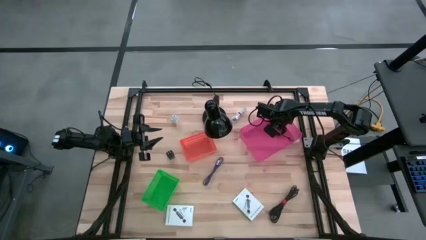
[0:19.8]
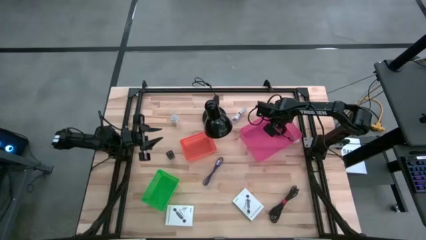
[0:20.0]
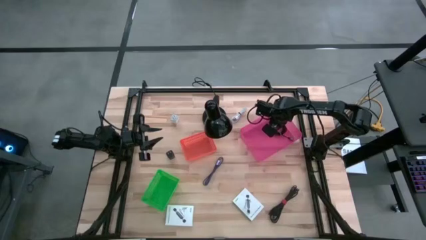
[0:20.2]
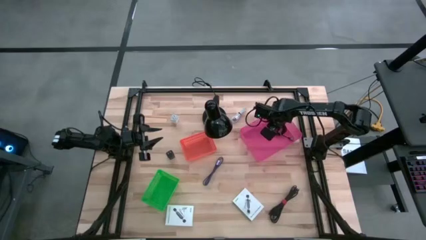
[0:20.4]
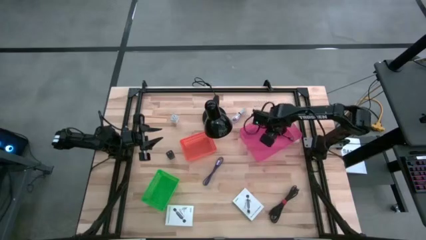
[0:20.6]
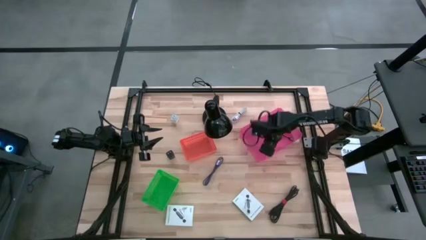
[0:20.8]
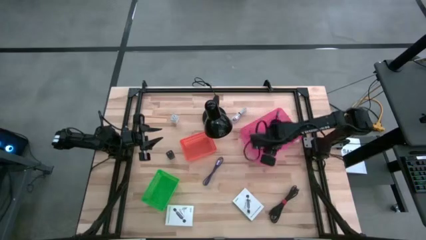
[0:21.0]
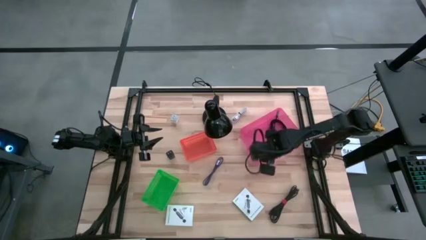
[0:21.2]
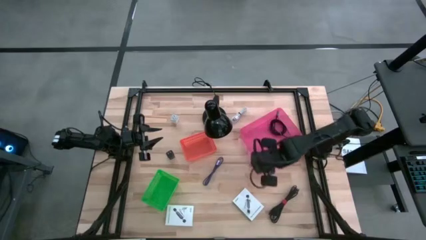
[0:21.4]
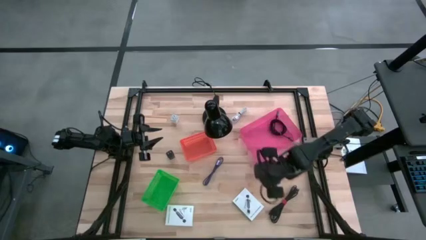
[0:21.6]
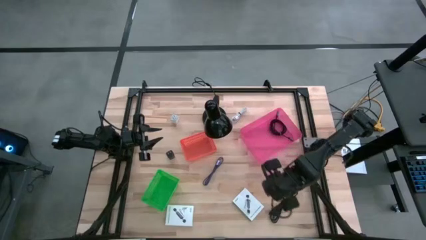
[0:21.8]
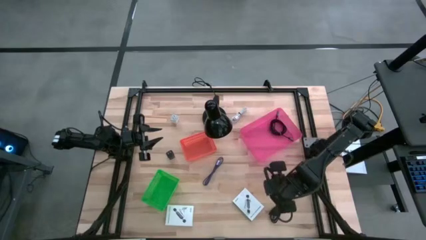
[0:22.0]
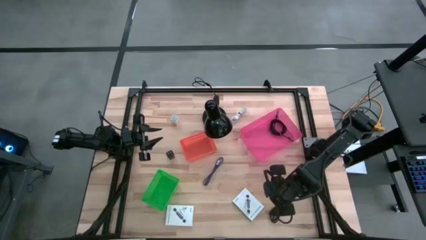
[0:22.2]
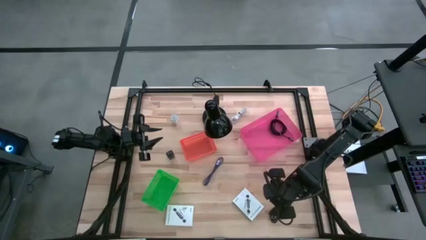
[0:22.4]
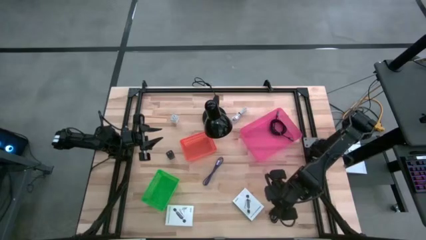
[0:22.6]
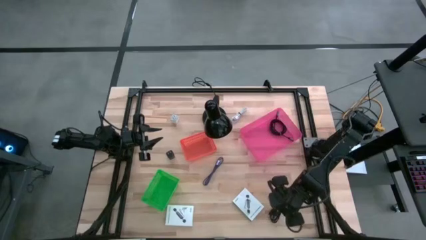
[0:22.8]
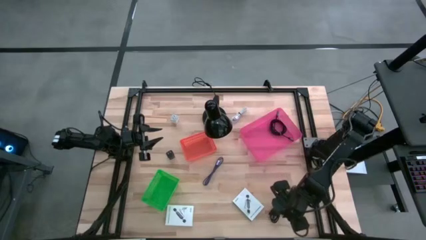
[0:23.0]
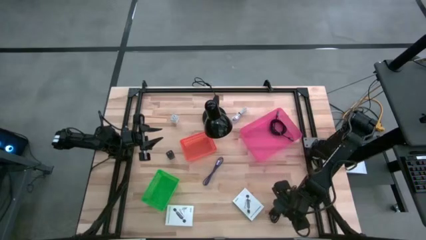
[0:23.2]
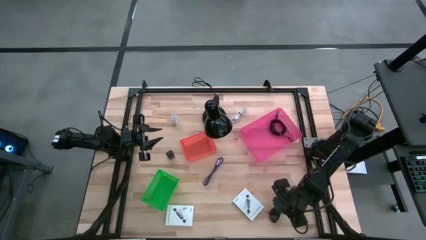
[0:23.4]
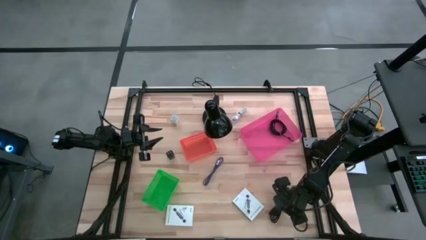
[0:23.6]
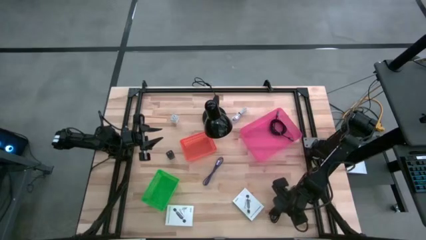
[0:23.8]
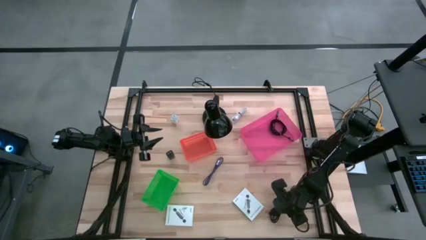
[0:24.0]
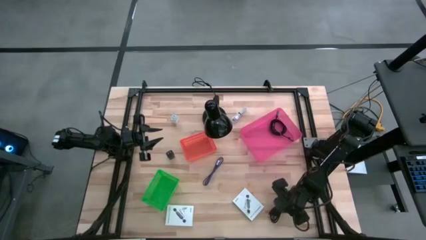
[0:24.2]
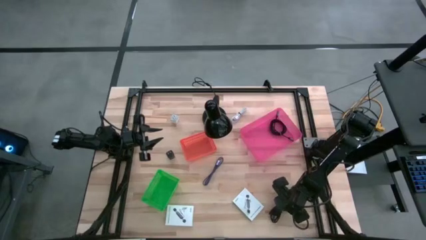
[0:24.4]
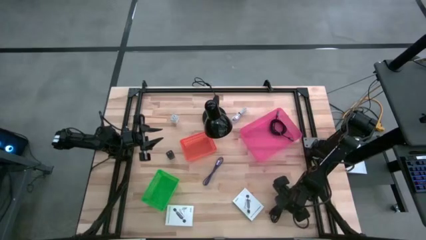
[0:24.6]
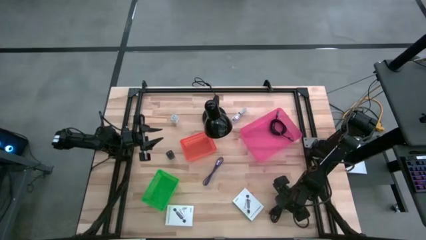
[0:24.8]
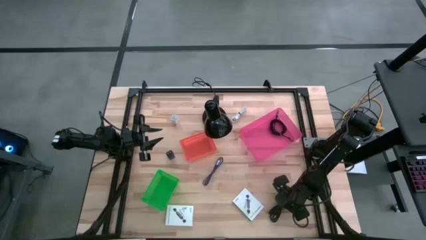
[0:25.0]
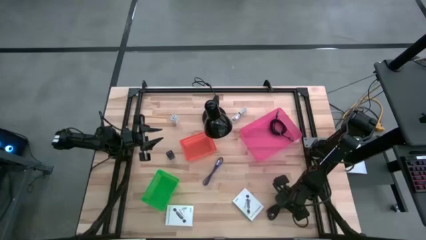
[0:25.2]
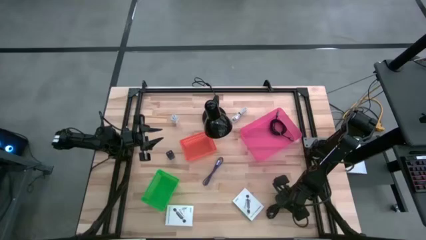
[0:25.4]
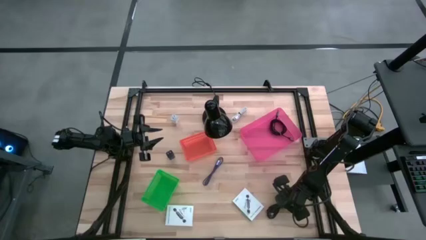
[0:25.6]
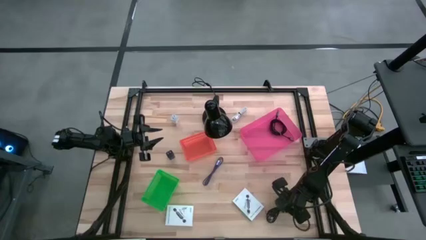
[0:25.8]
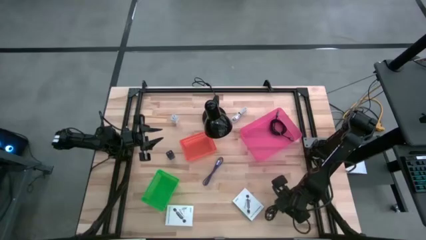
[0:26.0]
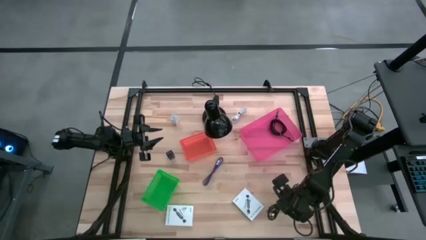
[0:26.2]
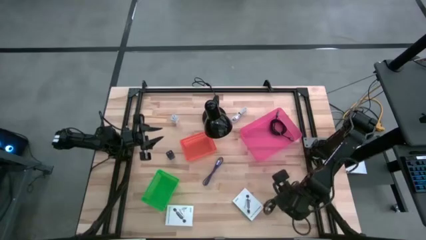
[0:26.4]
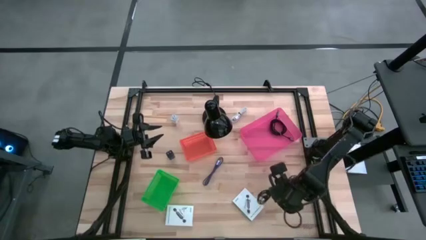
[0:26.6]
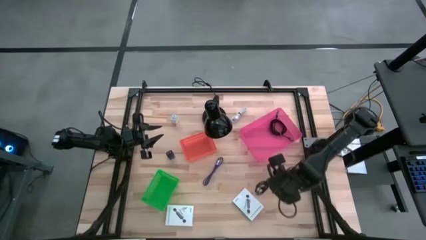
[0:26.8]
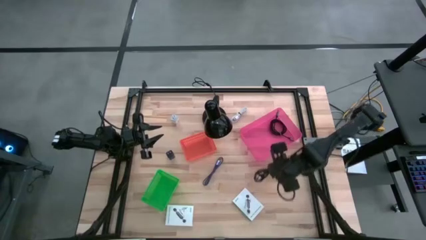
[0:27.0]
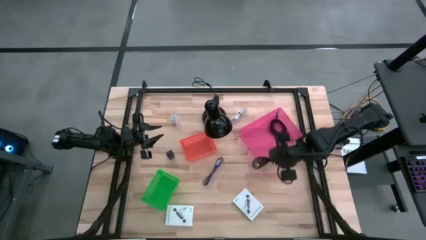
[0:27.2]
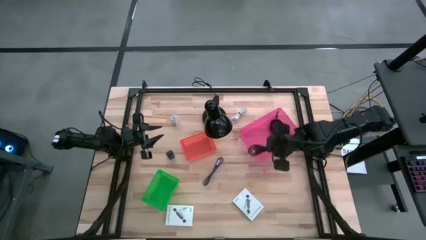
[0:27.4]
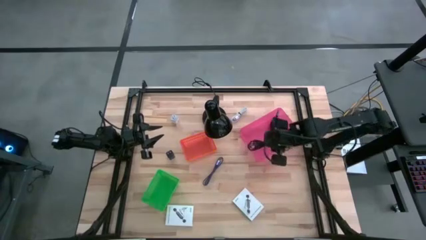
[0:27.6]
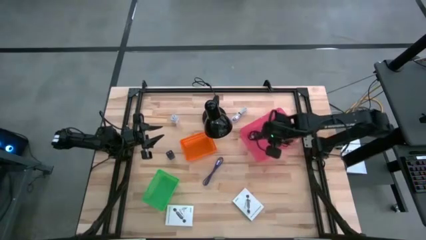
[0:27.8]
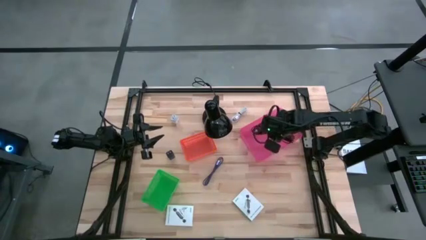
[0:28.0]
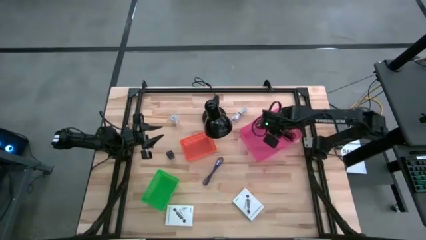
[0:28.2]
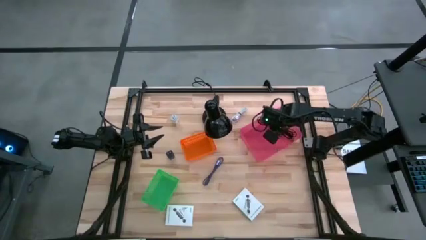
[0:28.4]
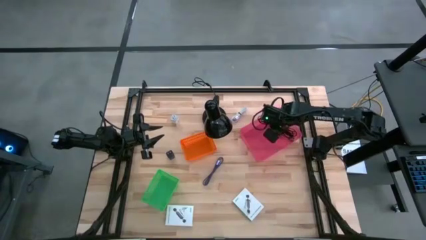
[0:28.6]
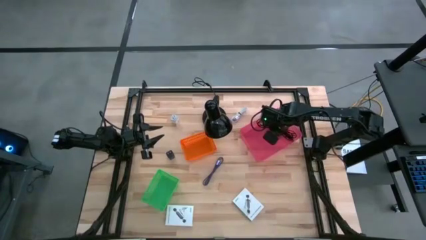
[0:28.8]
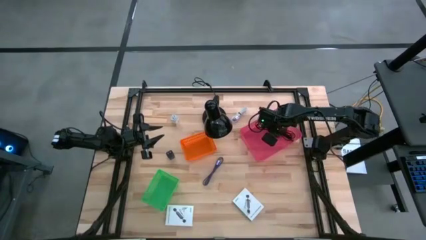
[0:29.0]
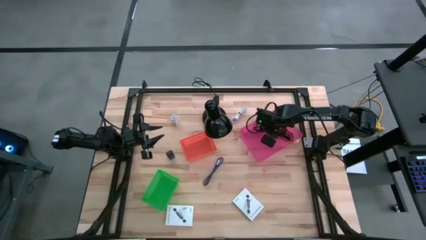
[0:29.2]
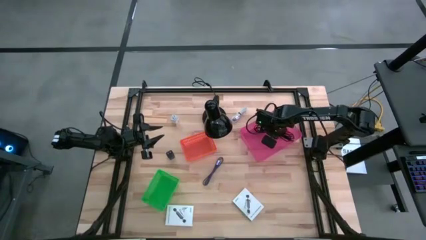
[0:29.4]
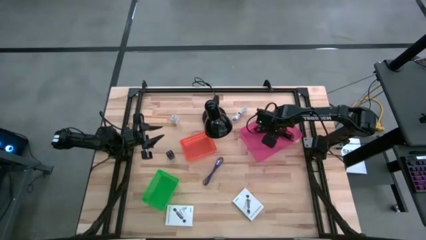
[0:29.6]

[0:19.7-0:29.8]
Task: Pick and place items into bin
Put the black charger cable into the pink bin

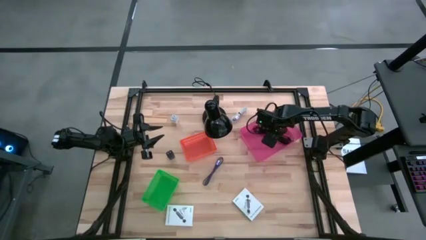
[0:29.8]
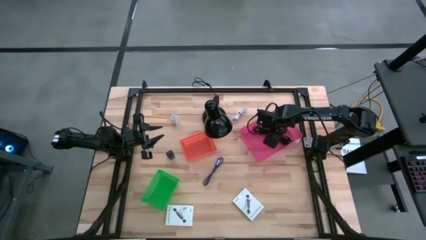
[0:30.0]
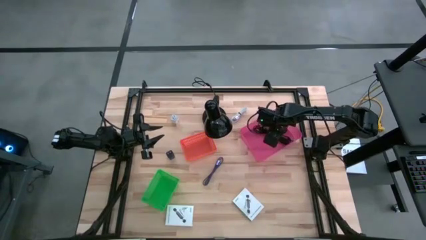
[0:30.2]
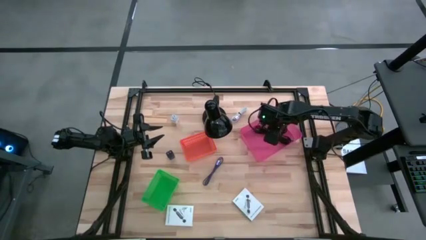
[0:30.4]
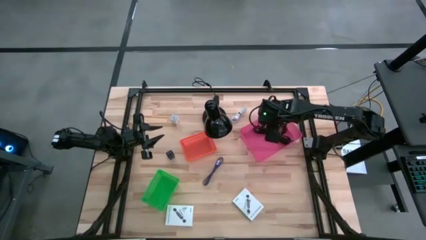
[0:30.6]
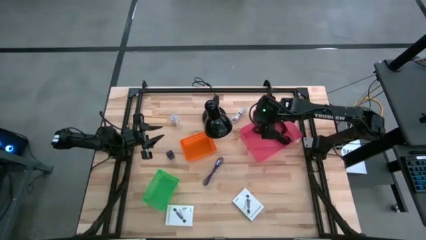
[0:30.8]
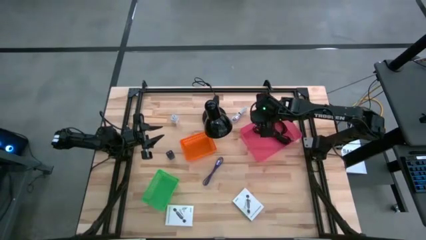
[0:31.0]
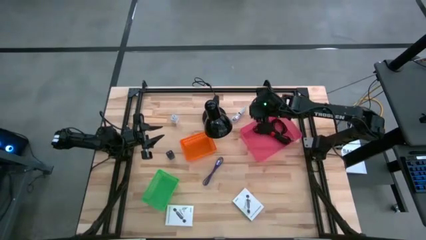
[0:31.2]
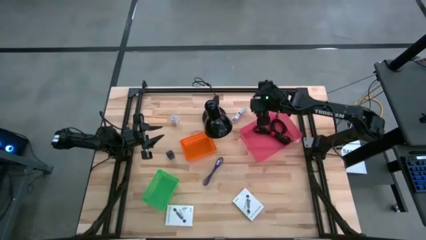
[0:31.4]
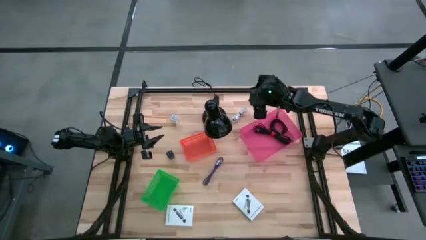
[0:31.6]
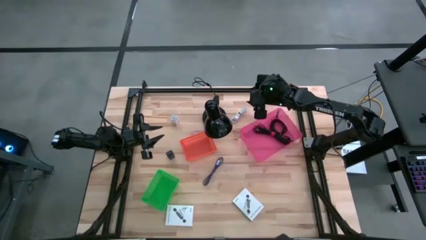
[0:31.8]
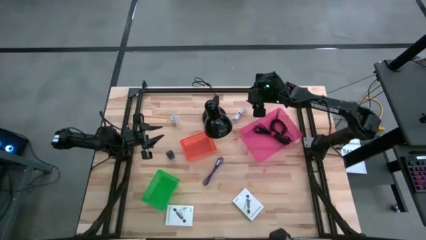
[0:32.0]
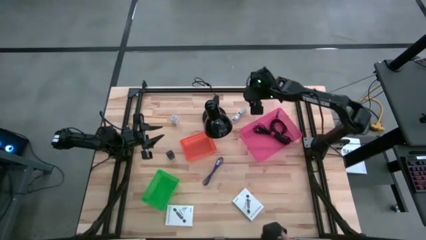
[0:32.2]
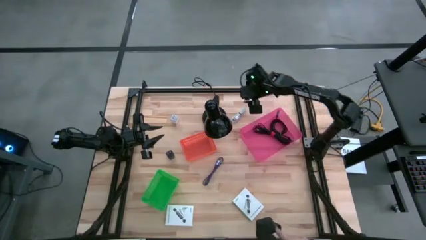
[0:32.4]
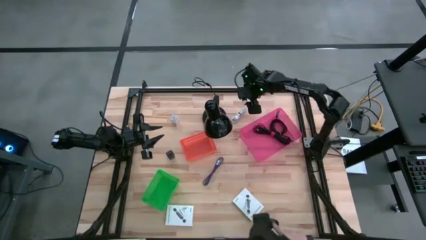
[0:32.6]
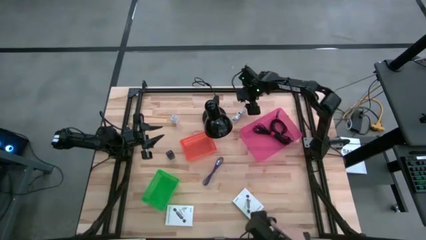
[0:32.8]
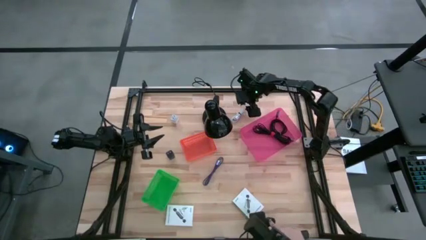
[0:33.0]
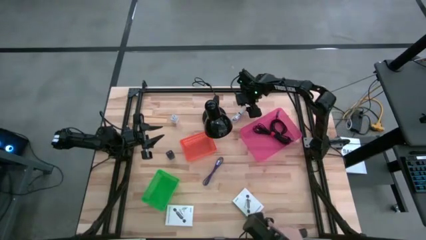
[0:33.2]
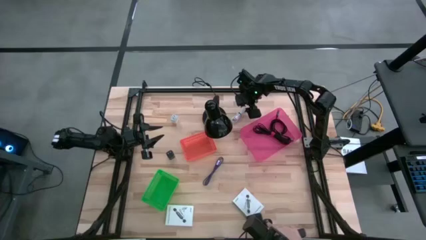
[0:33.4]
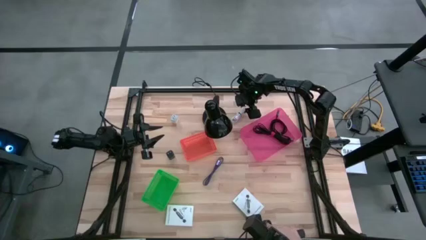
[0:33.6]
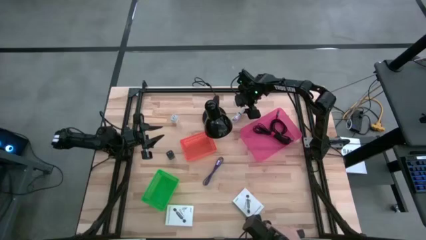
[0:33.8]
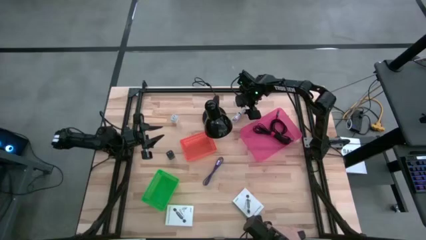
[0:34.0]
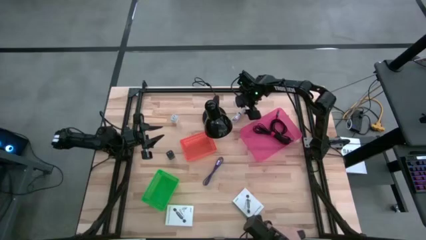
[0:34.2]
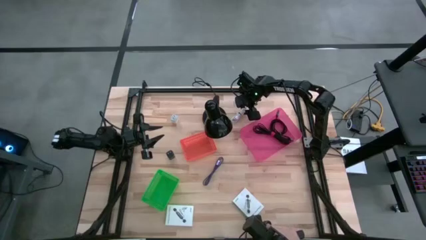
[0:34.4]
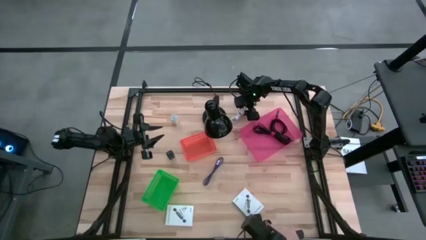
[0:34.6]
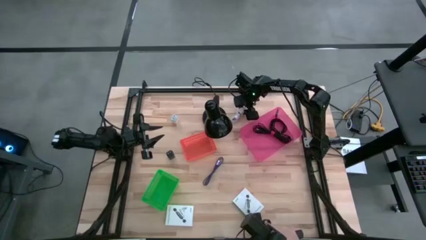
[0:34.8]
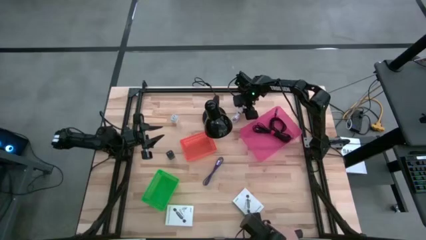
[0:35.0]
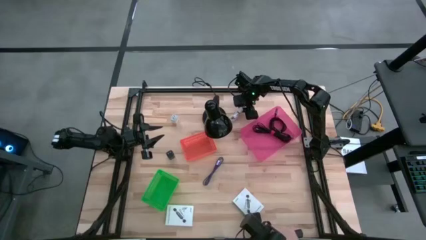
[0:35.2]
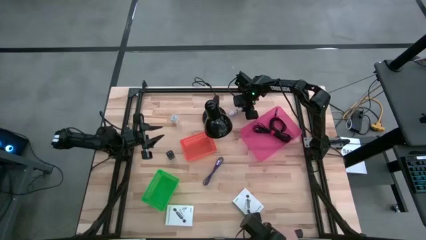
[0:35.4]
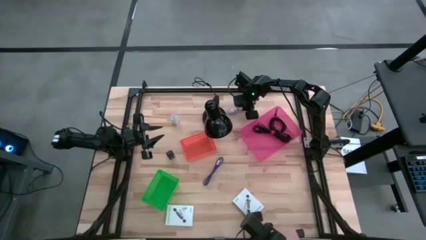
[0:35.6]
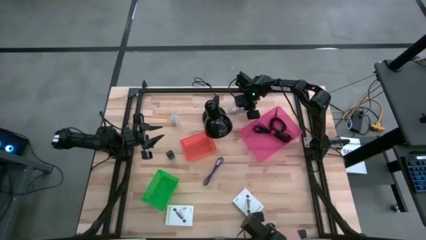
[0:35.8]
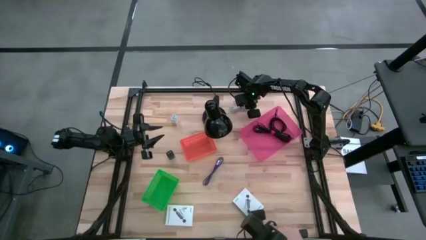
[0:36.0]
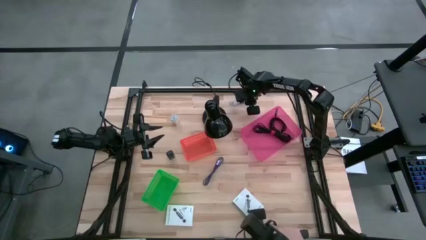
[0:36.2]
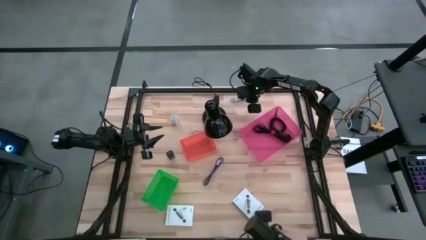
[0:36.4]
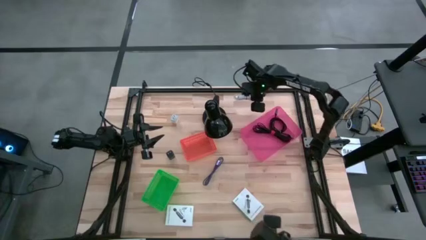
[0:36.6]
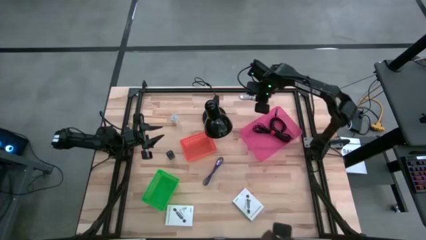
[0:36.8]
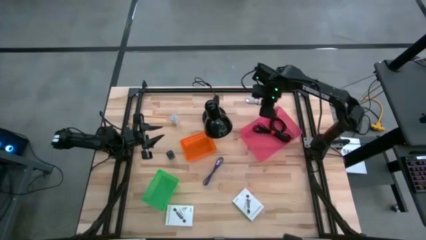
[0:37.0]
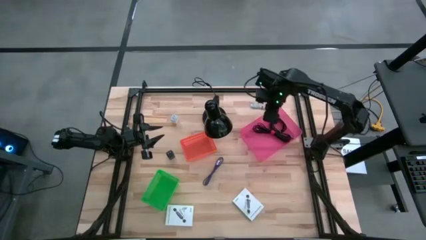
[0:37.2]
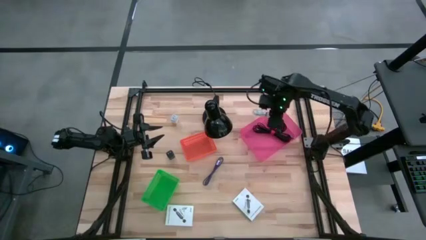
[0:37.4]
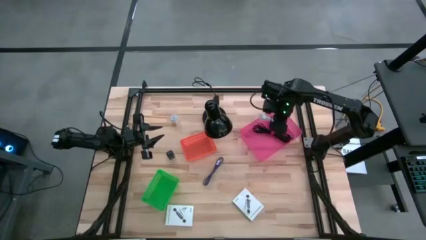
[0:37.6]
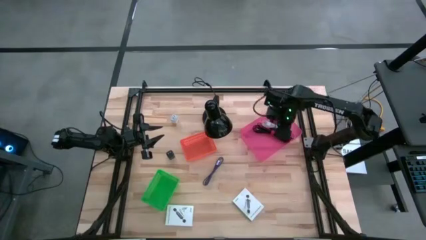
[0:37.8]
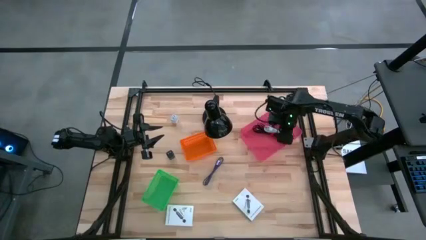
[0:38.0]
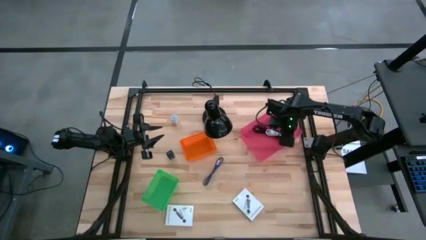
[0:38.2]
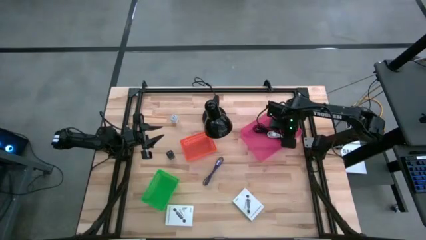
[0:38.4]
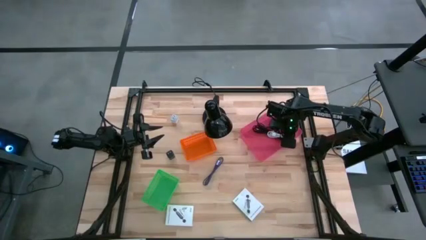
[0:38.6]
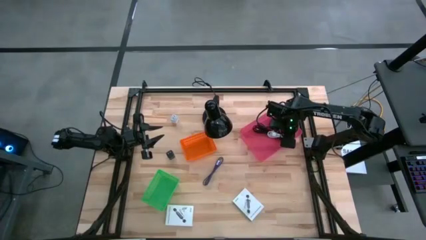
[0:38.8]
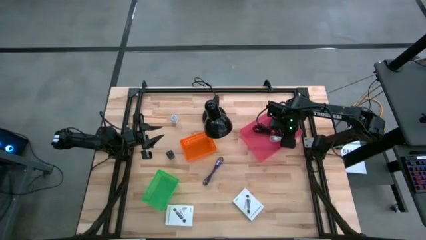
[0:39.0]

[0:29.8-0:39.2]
Put the white charger cable into the pink bin
